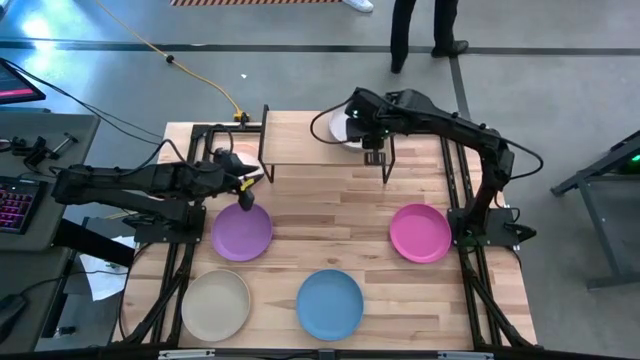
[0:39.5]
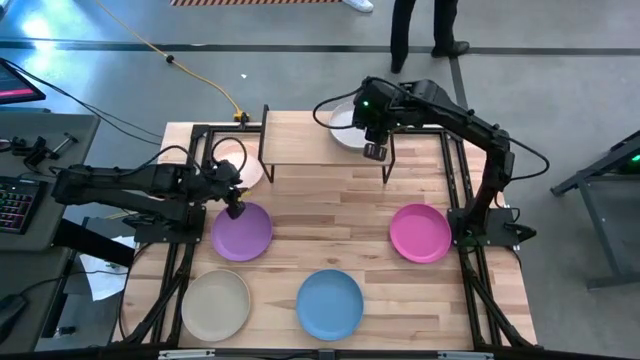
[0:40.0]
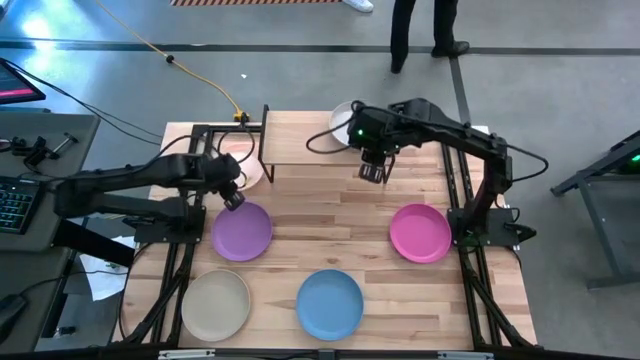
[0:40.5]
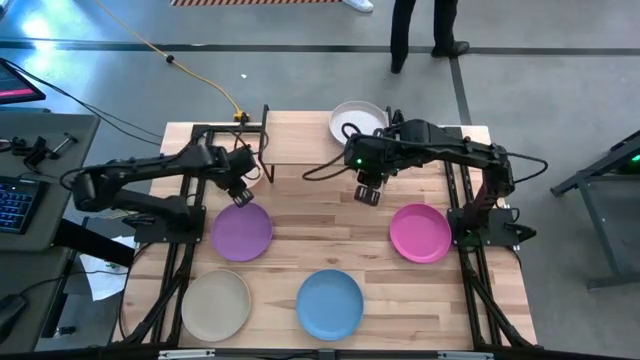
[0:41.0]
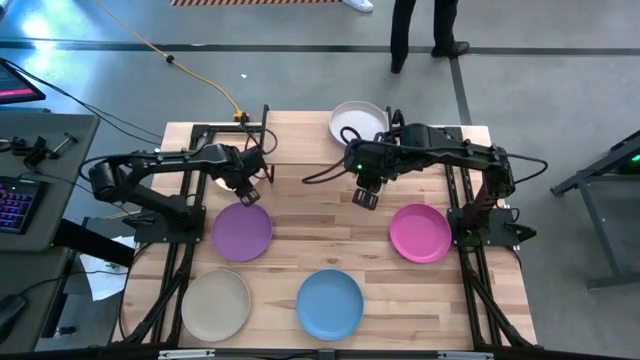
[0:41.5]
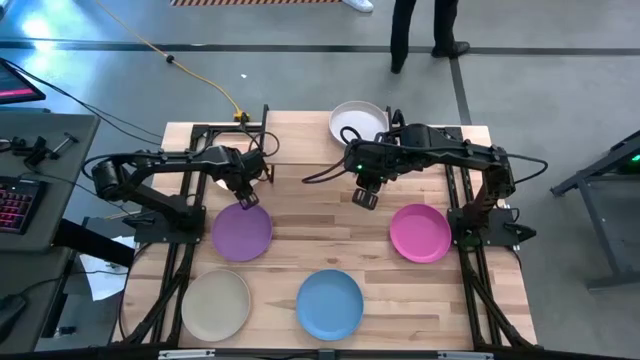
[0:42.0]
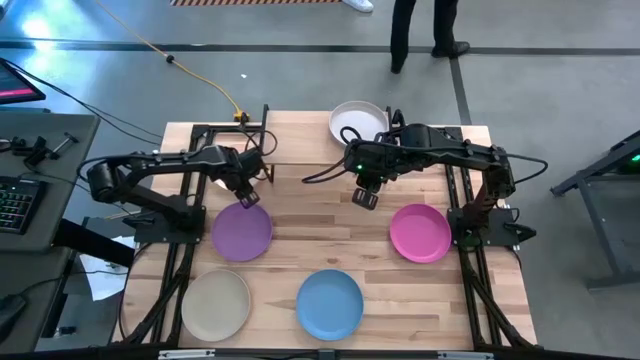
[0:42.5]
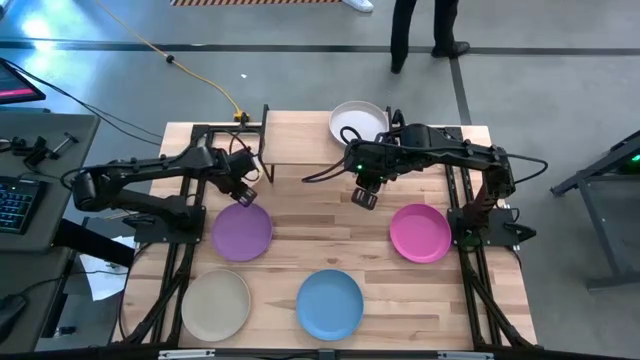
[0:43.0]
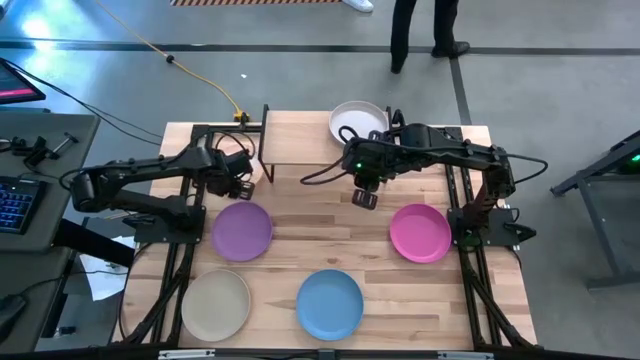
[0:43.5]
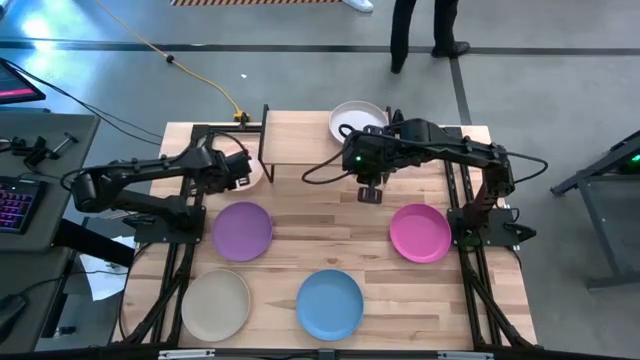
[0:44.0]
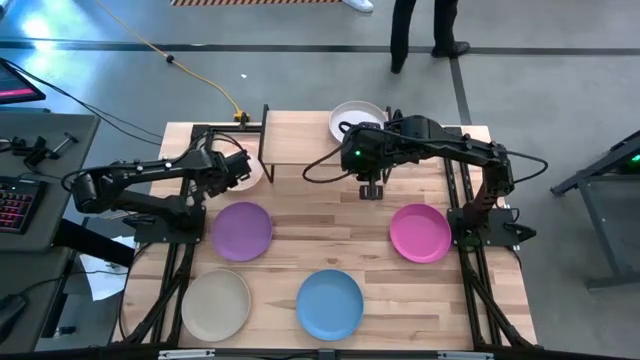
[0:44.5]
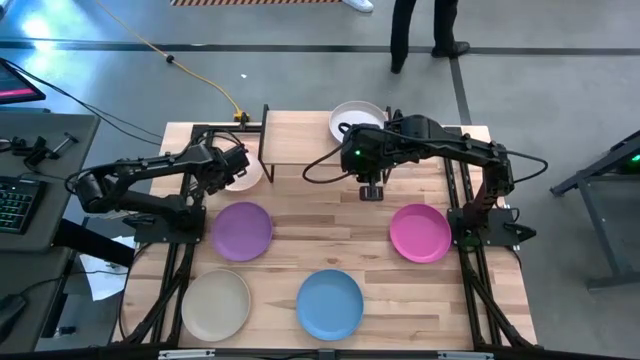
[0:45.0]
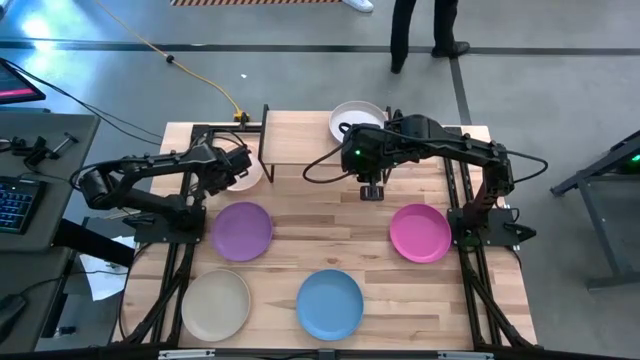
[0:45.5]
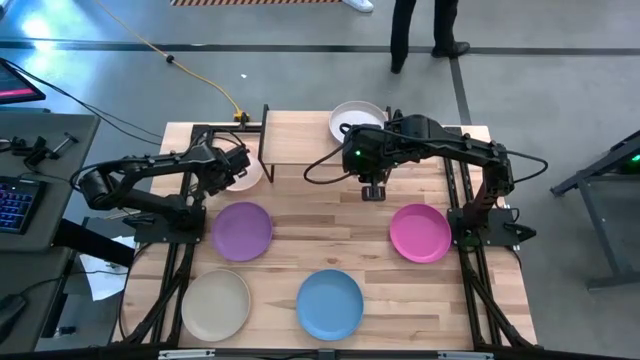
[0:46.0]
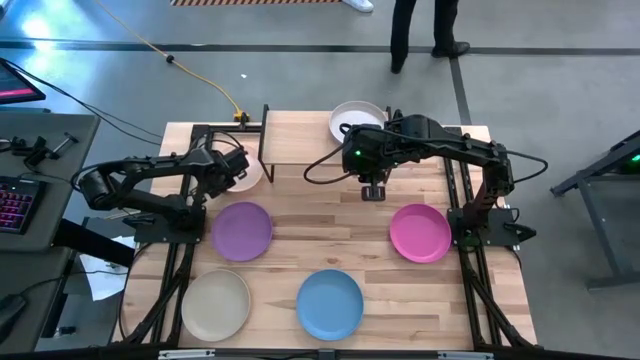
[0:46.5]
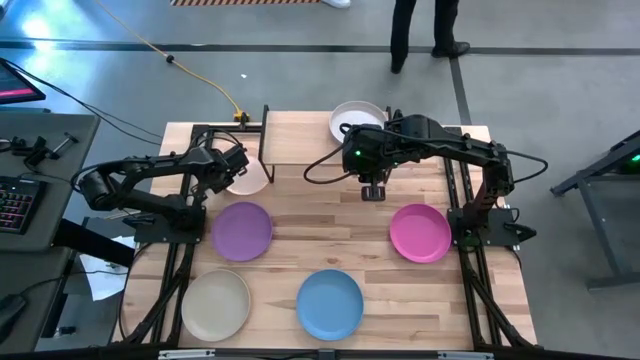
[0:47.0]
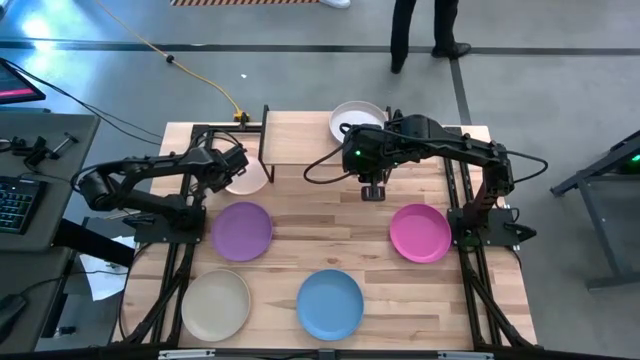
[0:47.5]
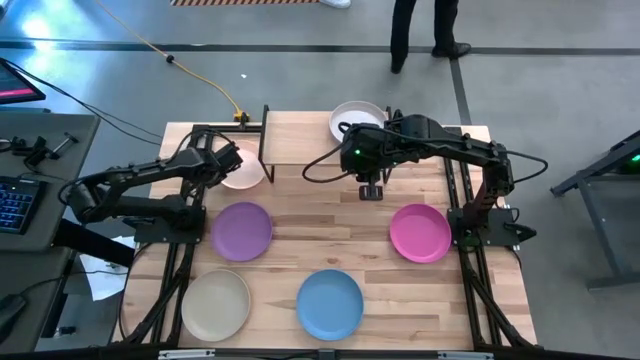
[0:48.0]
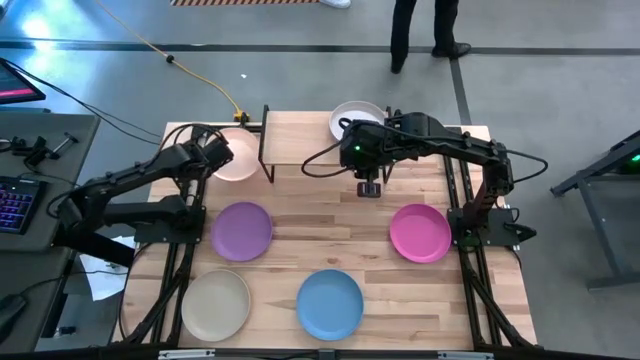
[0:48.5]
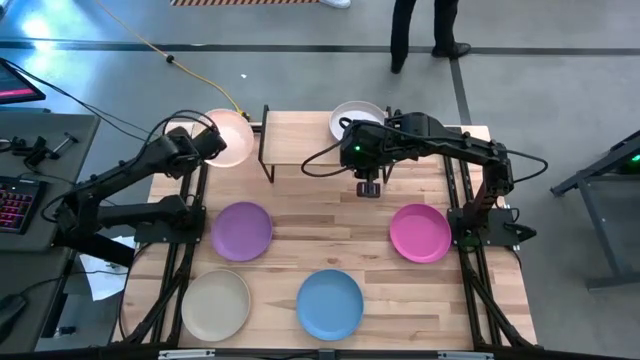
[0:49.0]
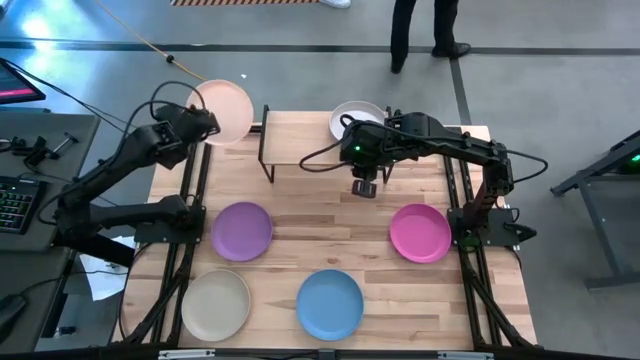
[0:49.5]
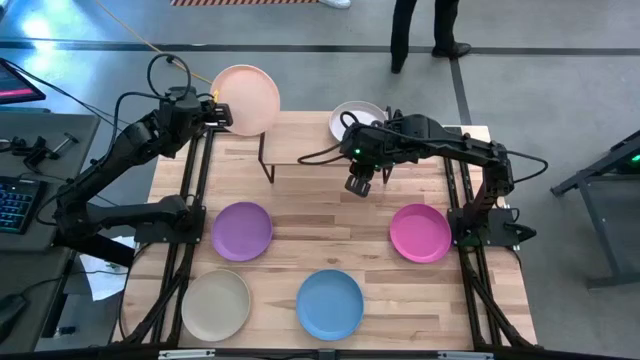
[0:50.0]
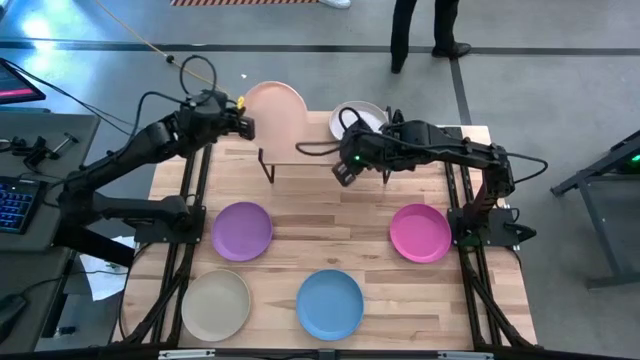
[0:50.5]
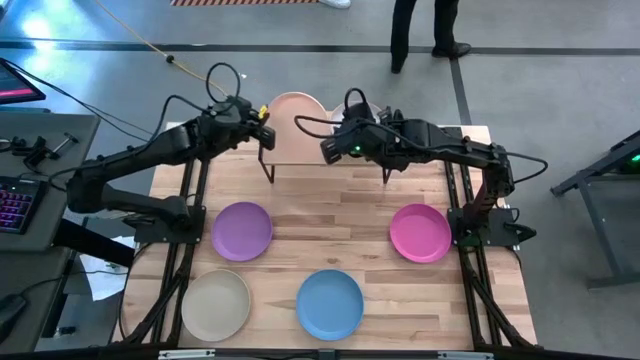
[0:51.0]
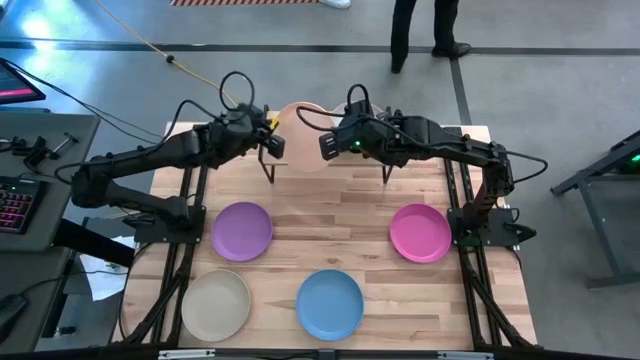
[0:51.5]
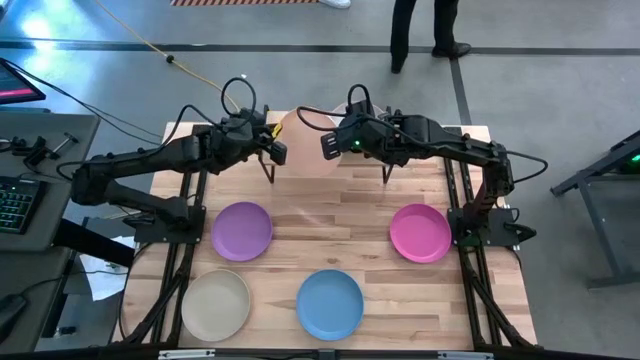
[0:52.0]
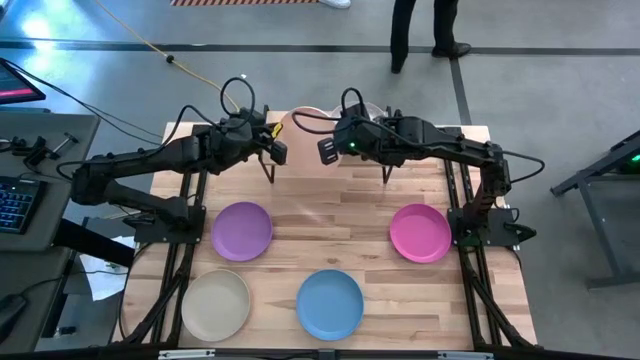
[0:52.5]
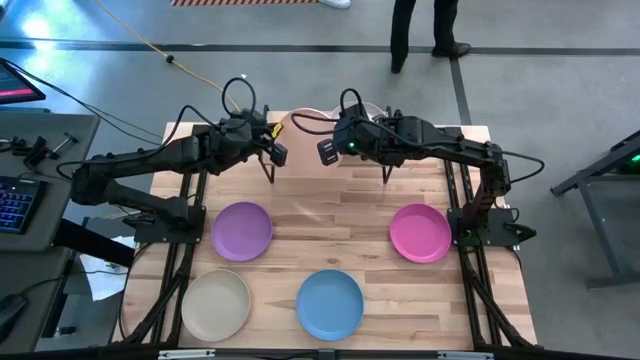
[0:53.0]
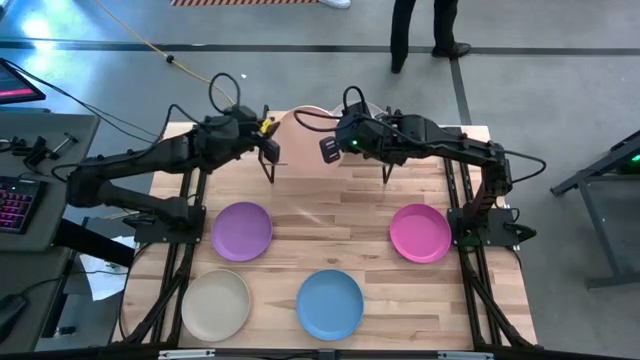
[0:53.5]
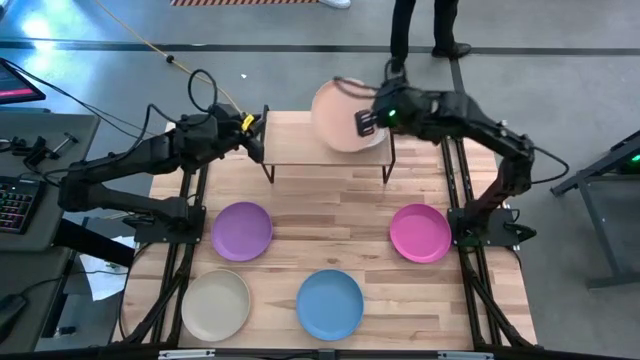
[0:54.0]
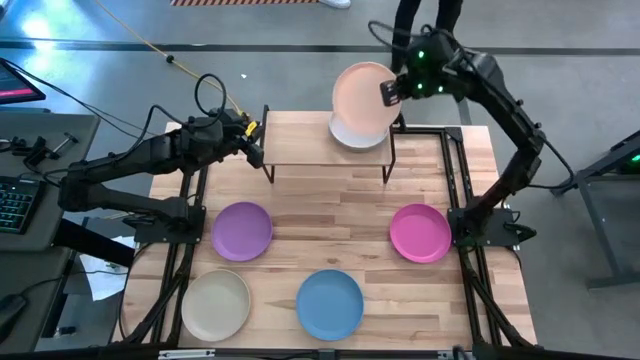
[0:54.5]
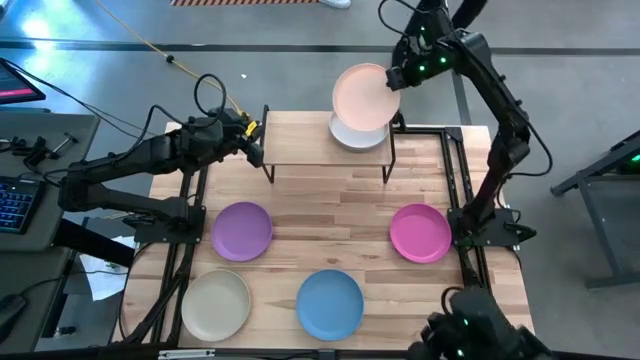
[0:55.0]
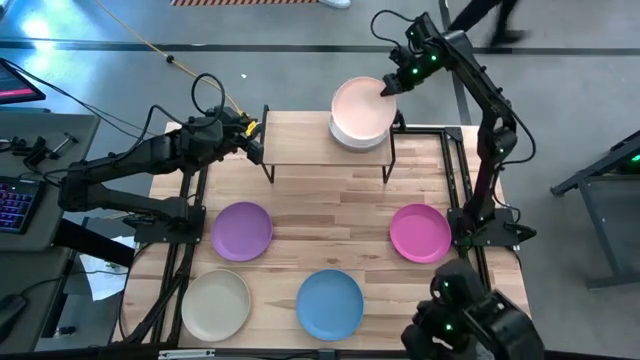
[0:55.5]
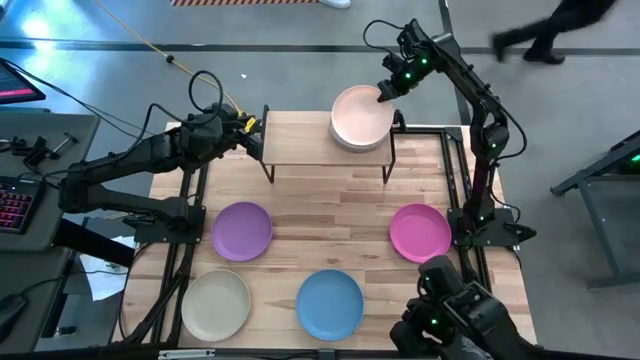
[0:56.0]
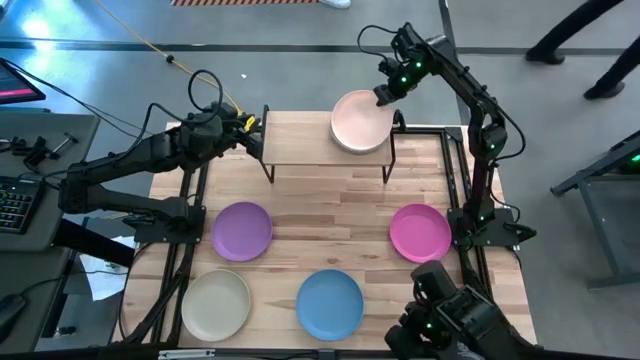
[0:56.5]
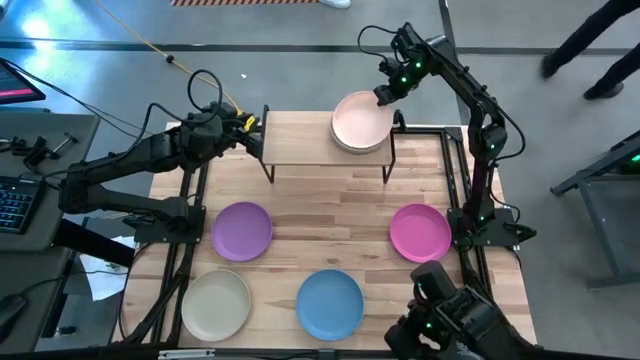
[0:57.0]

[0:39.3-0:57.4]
Task: Place and stack plates onto a shelf
Stack the light pink plate on top of the gray plate on the shelf

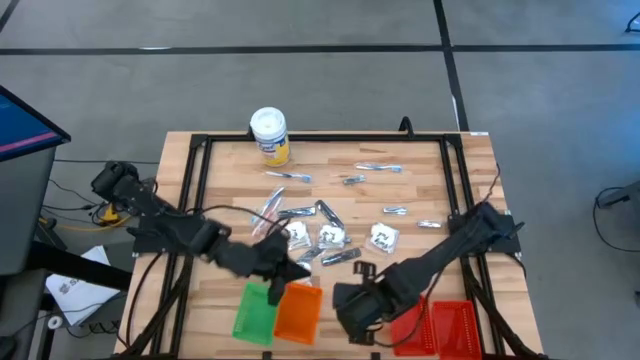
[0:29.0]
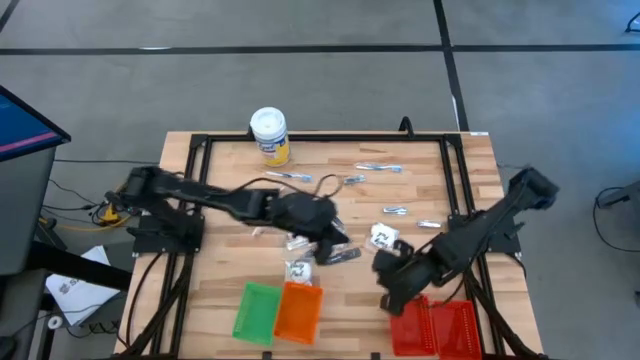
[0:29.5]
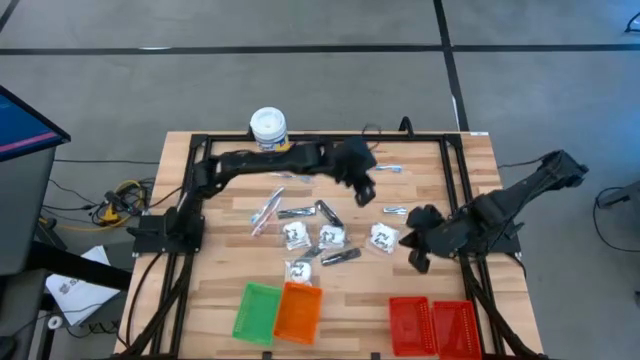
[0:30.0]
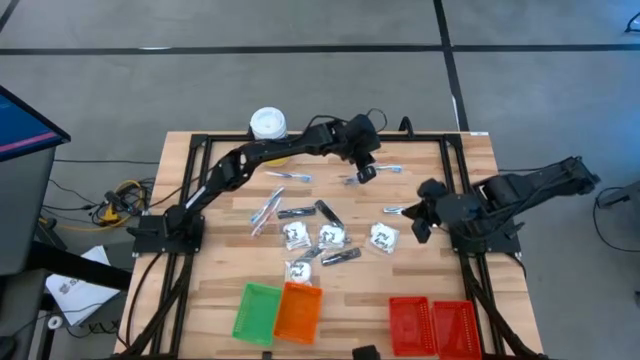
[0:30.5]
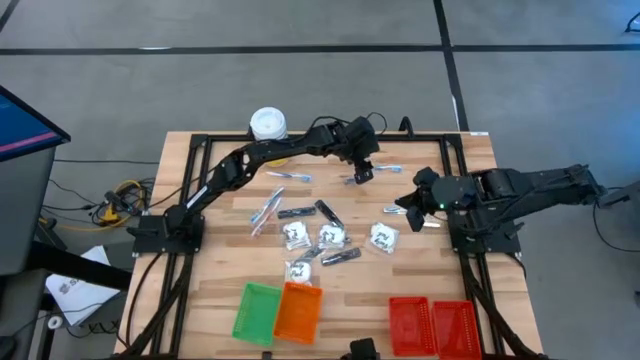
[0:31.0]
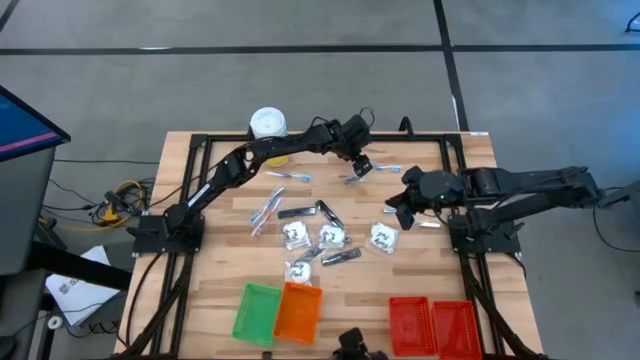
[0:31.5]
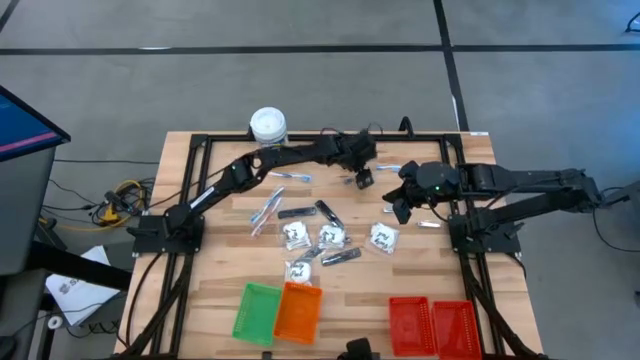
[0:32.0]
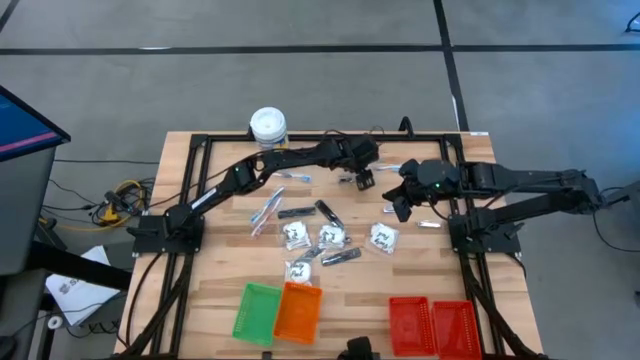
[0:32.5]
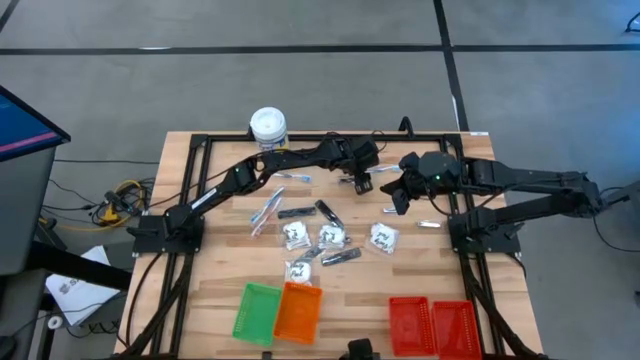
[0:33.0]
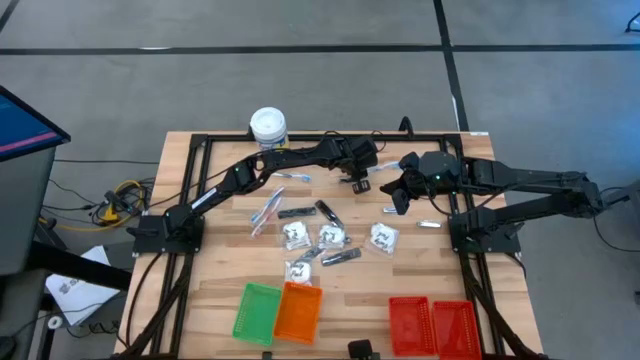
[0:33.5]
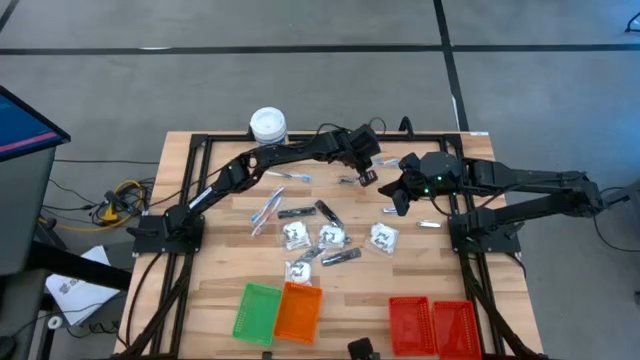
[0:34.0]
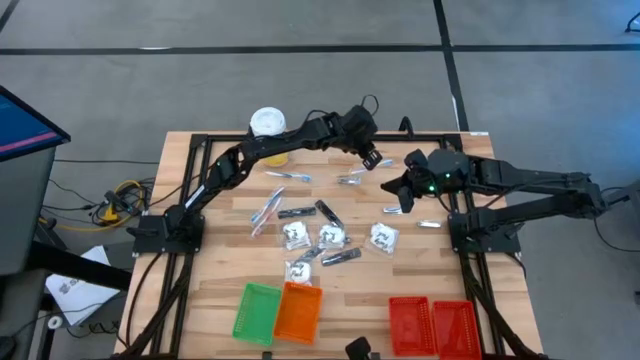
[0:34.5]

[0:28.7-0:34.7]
Task: Pick & Place Travel size toiletries
Put the blue toothbrush into the green basket
